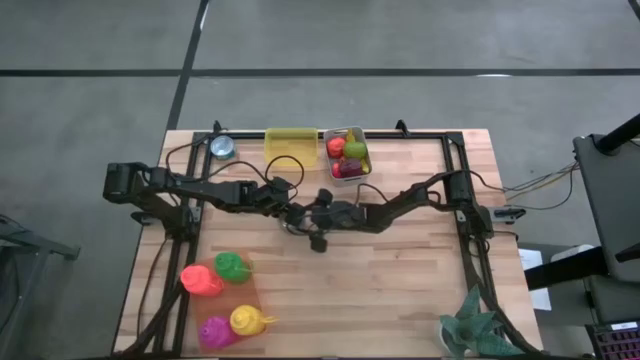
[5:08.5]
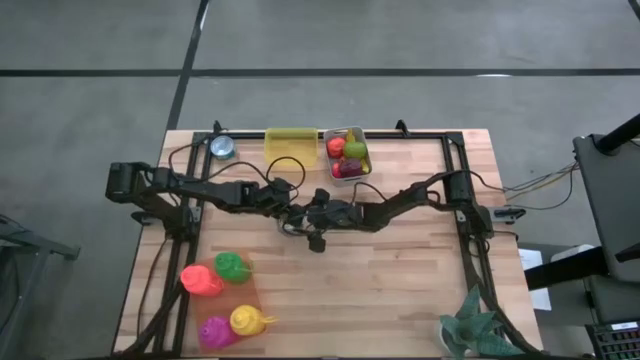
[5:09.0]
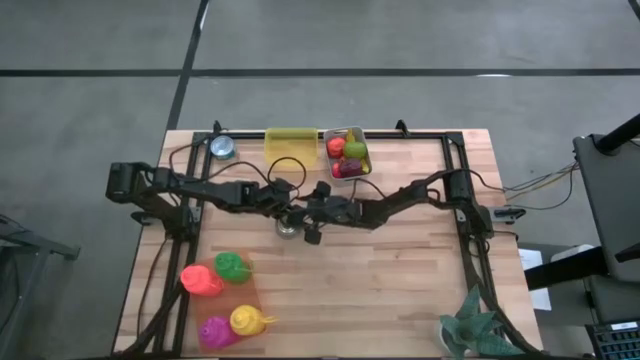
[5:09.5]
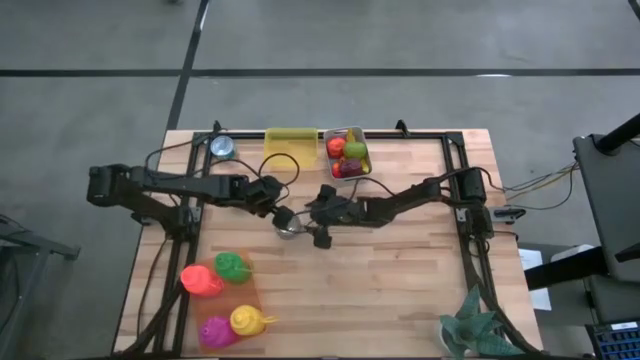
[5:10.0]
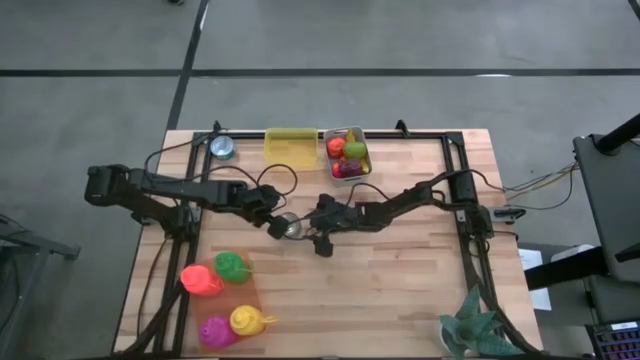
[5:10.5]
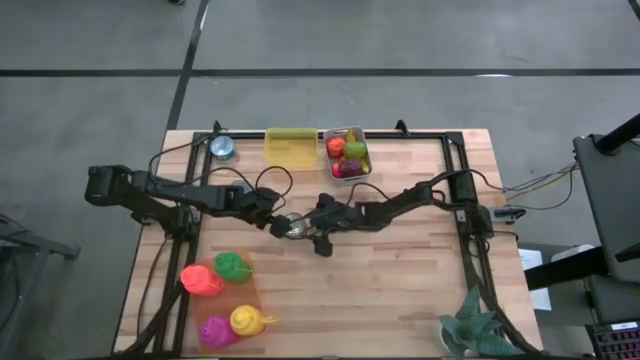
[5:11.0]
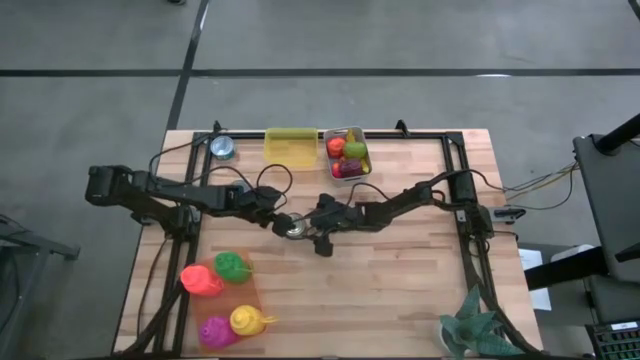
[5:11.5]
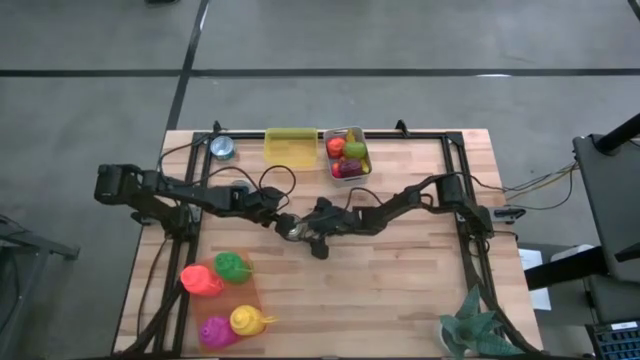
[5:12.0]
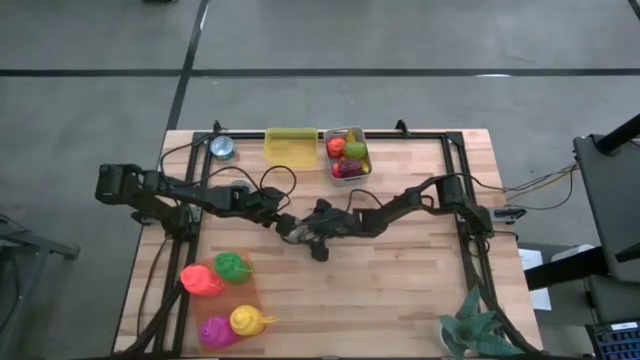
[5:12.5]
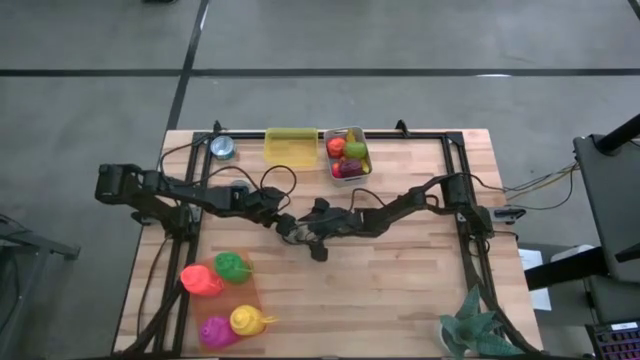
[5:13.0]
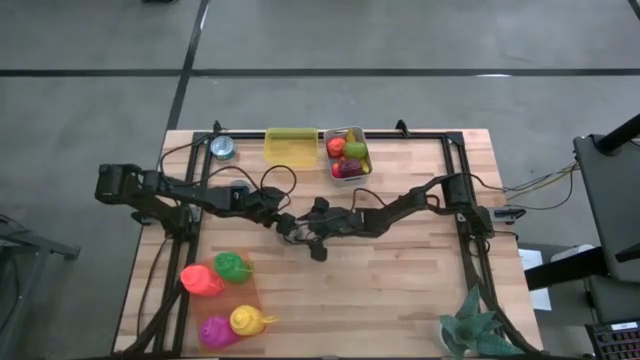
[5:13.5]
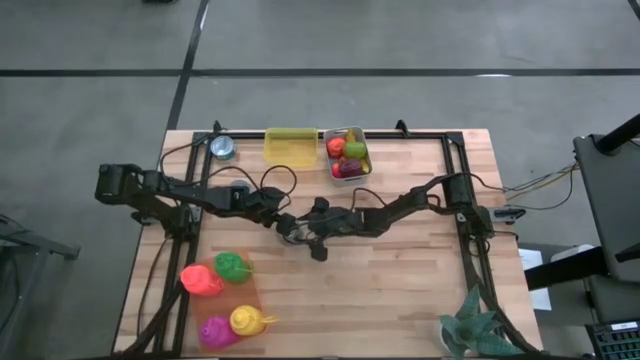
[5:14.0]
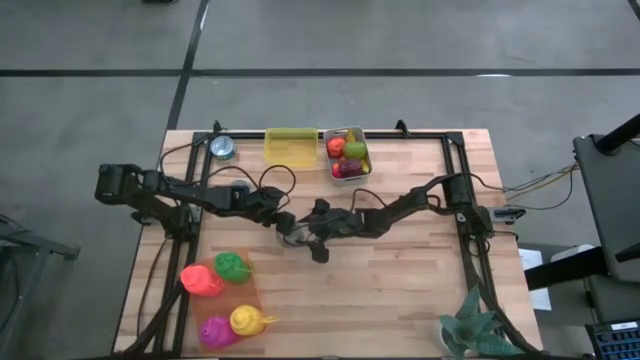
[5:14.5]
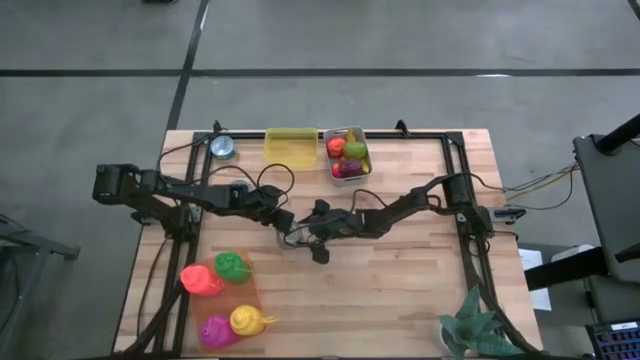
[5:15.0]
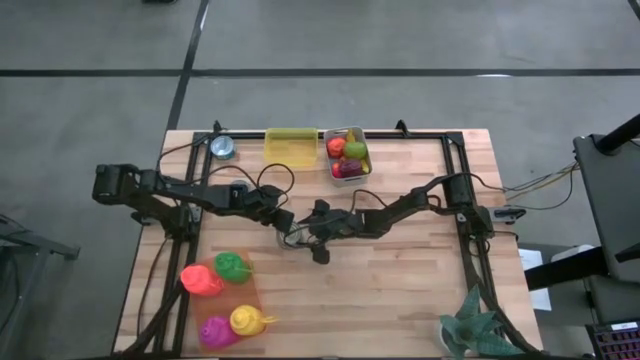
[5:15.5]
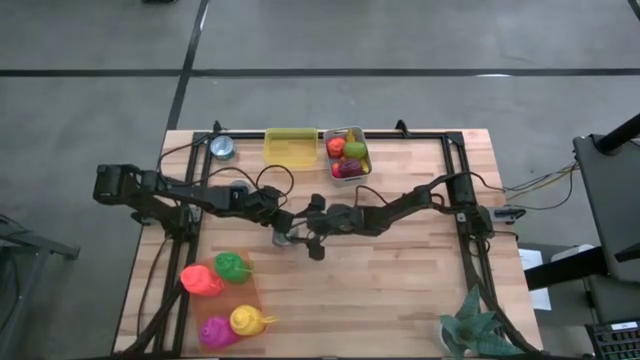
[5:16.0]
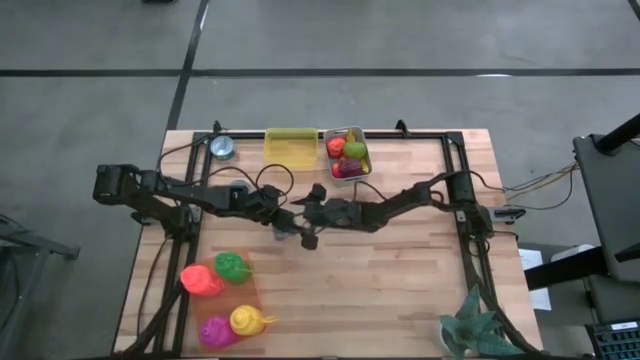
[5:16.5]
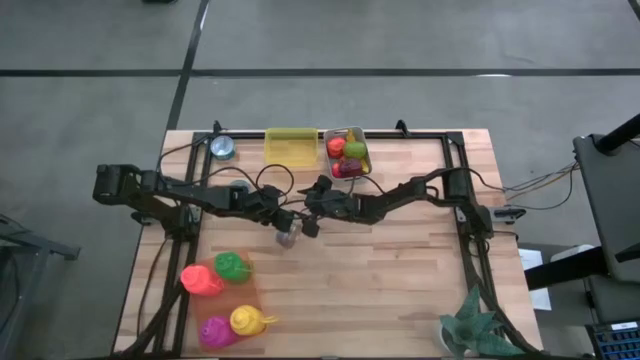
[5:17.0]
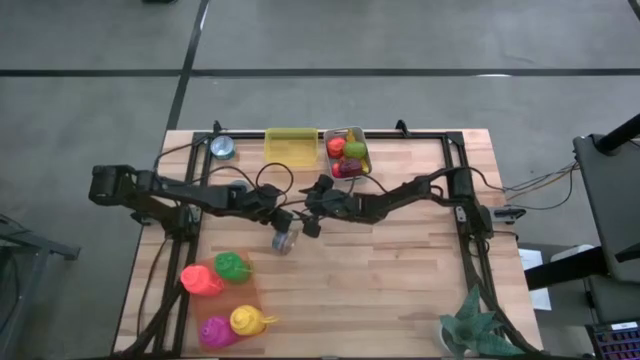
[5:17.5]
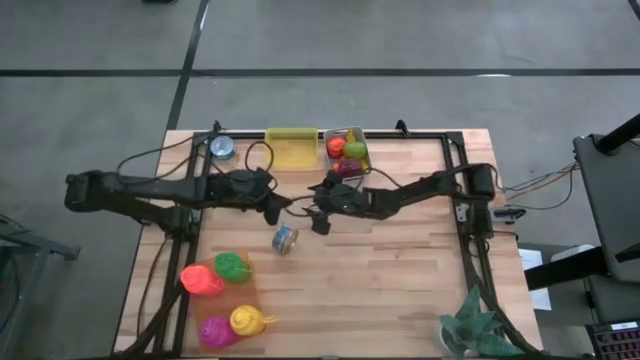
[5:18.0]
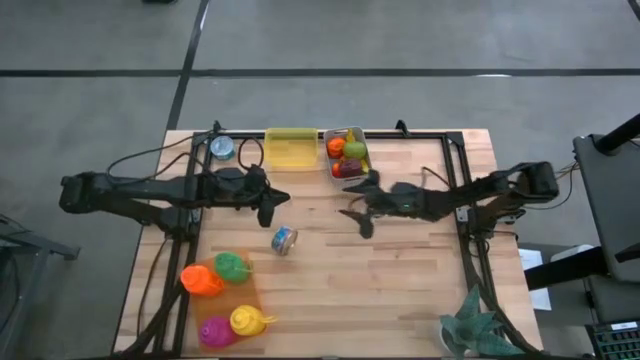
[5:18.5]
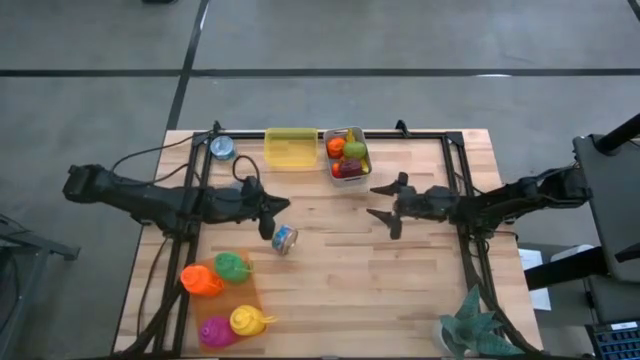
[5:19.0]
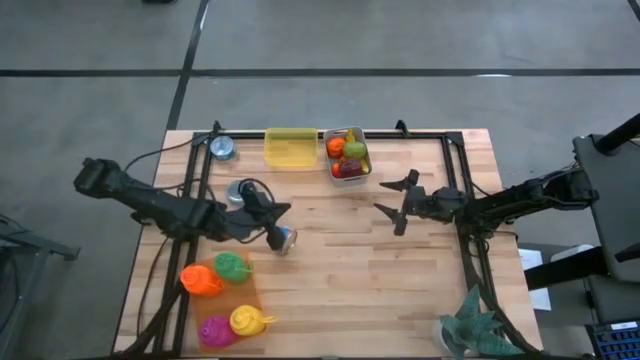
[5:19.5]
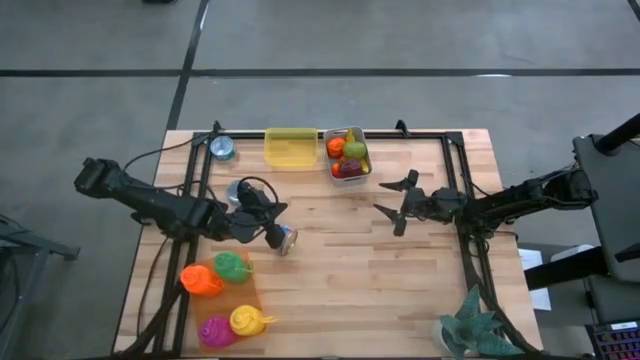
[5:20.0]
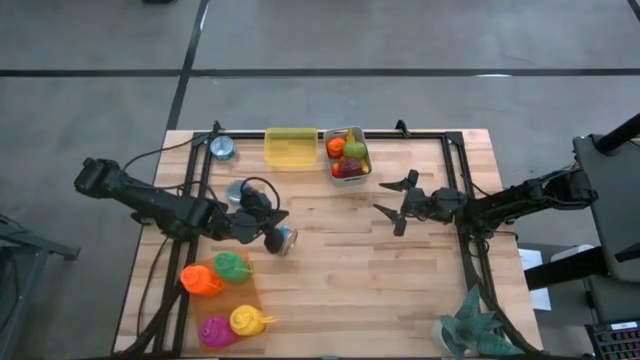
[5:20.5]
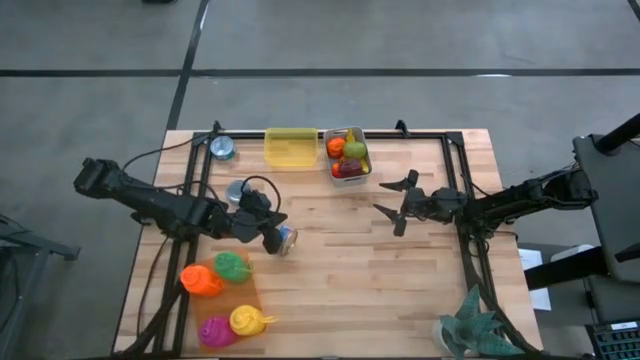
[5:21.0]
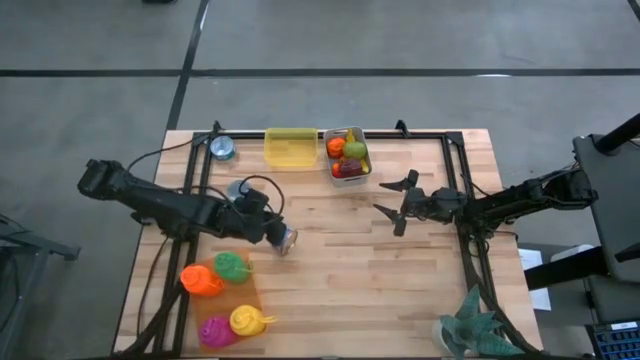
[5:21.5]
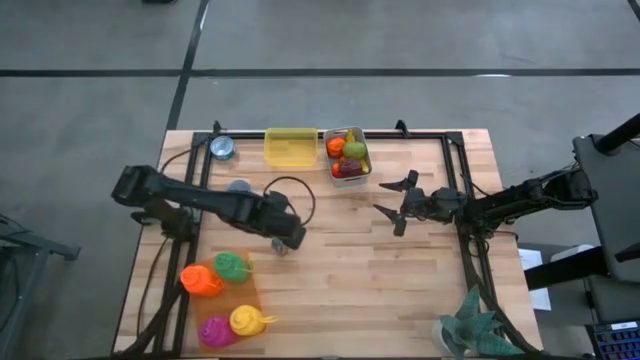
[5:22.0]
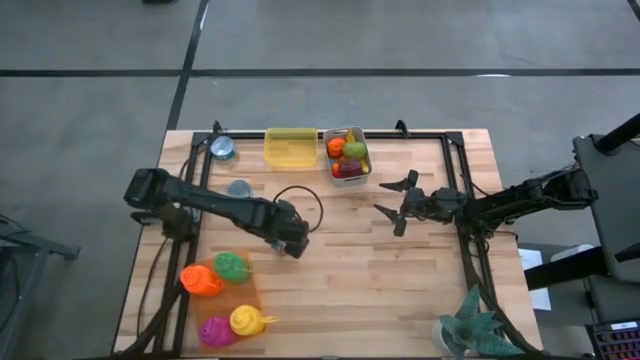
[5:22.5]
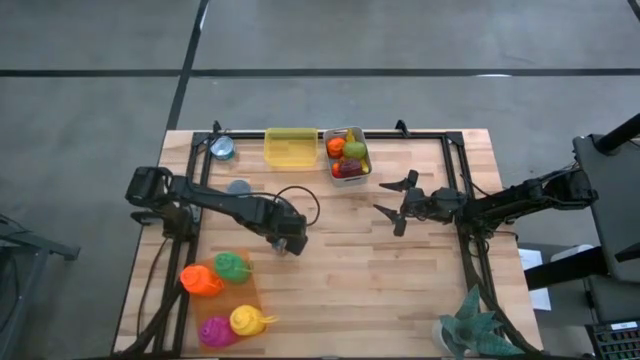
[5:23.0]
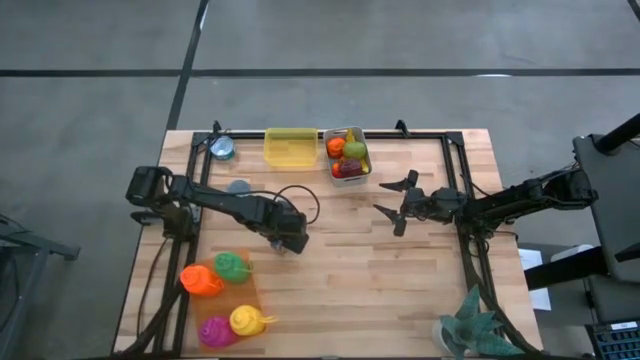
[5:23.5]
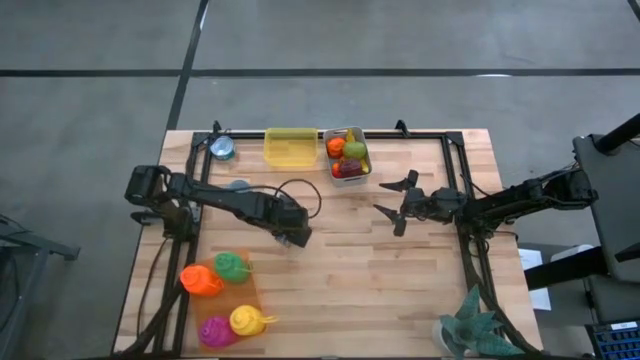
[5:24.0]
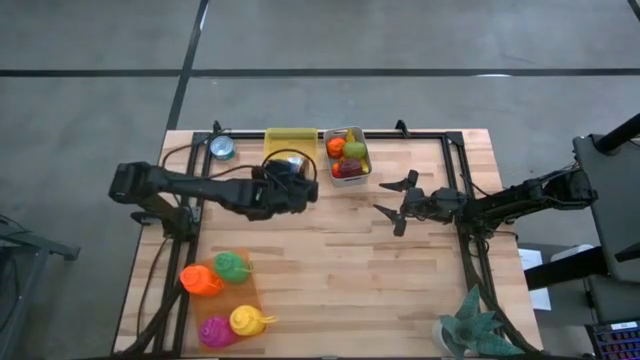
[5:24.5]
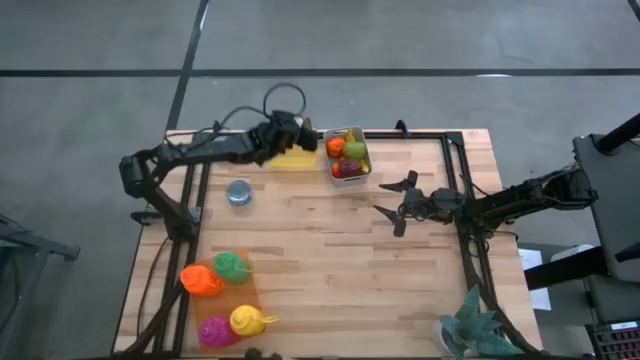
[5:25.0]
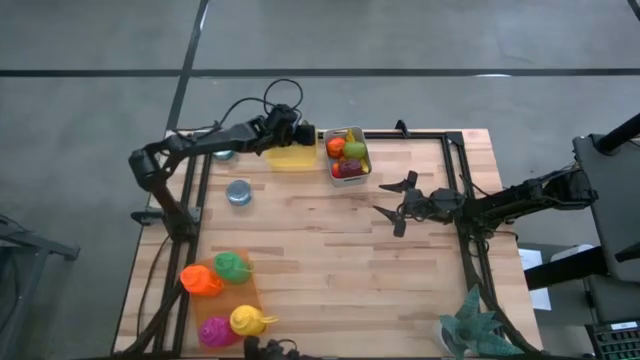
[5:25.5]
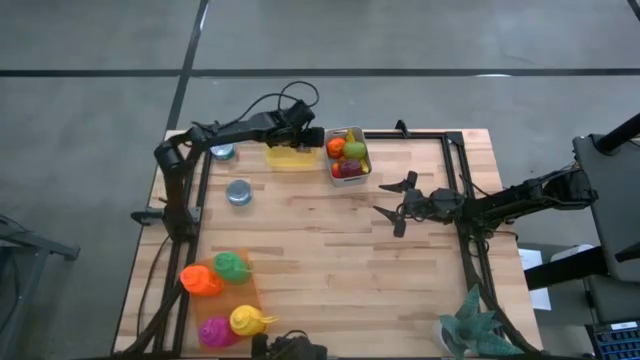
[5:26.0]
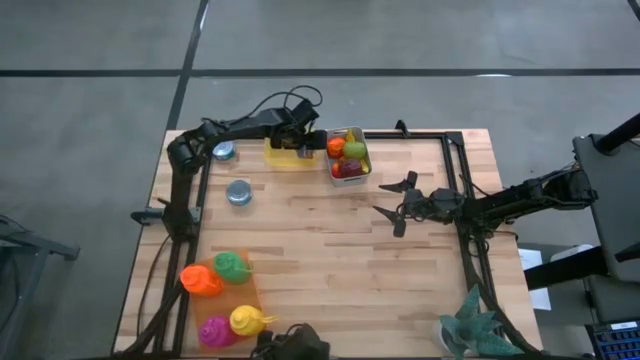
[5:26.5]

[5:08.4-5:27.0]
Task: Pick & Place Food Item
Put the blue and pink tuna can into the yellow bin
